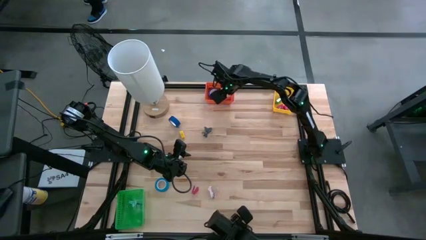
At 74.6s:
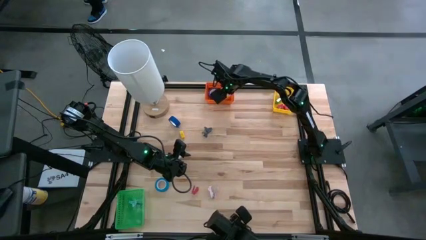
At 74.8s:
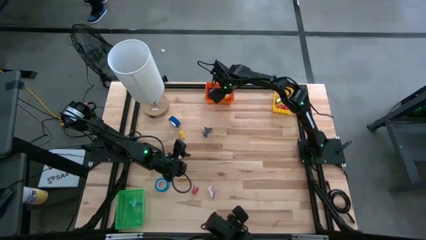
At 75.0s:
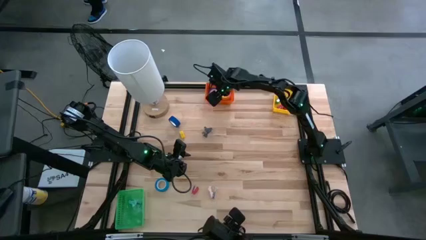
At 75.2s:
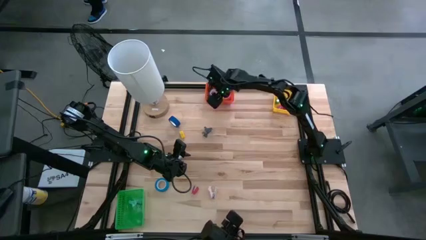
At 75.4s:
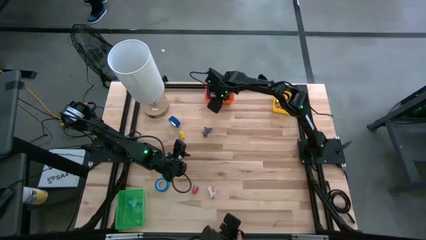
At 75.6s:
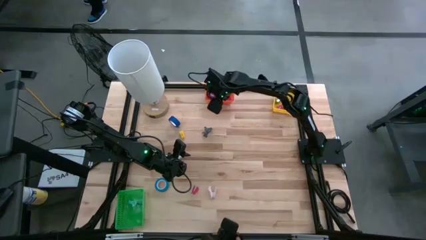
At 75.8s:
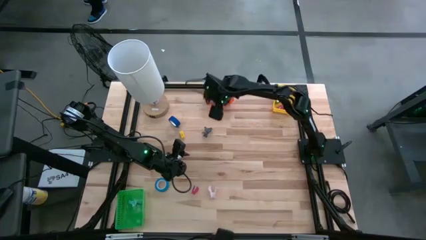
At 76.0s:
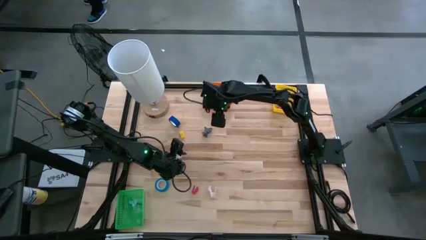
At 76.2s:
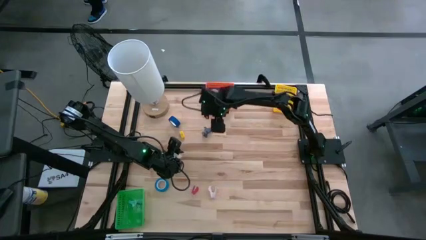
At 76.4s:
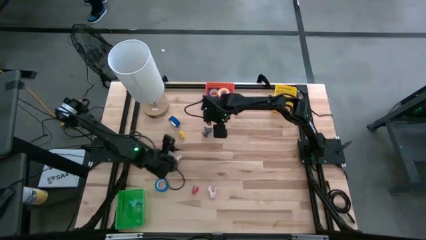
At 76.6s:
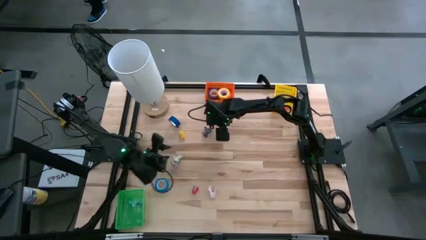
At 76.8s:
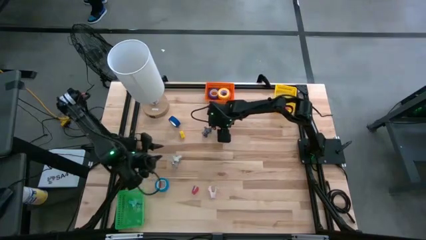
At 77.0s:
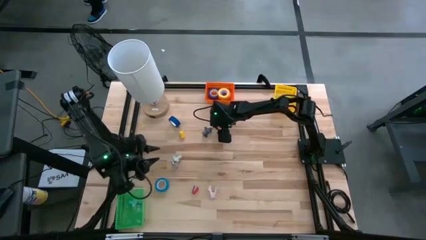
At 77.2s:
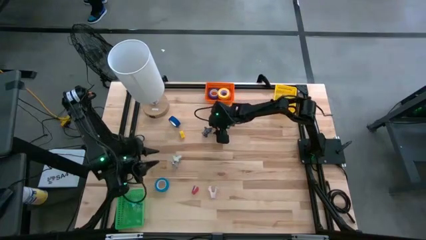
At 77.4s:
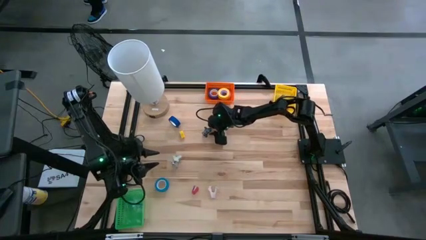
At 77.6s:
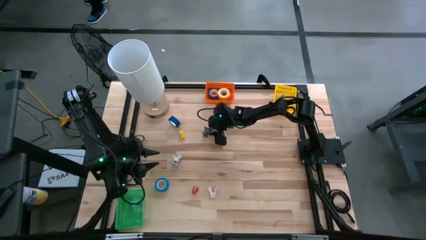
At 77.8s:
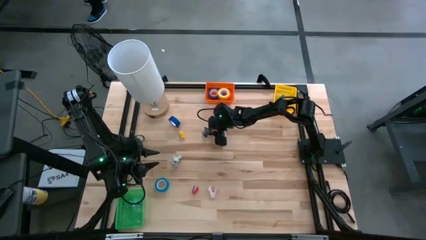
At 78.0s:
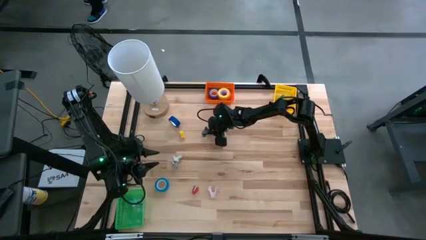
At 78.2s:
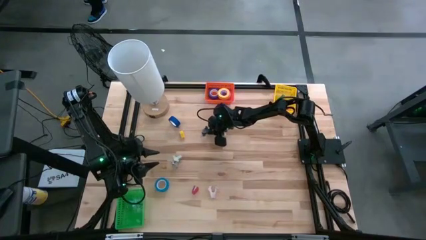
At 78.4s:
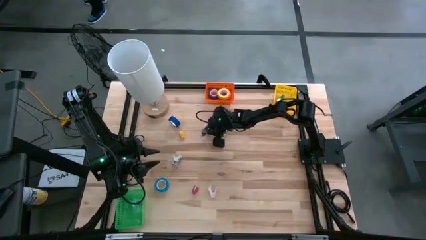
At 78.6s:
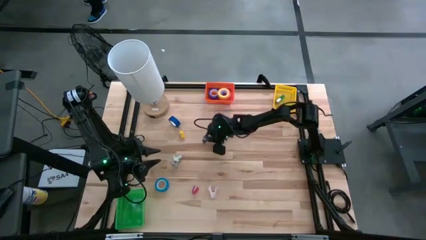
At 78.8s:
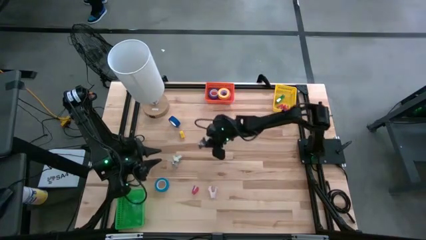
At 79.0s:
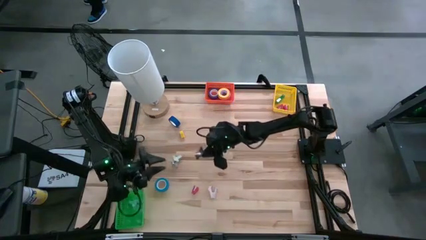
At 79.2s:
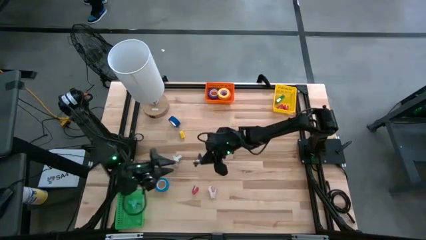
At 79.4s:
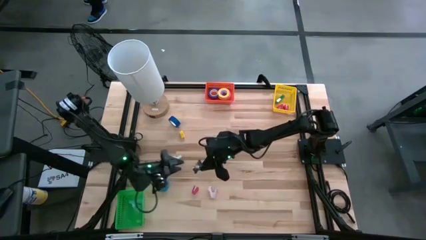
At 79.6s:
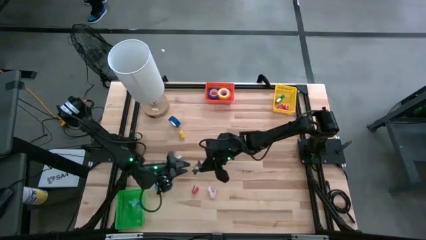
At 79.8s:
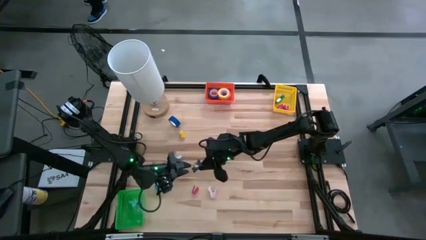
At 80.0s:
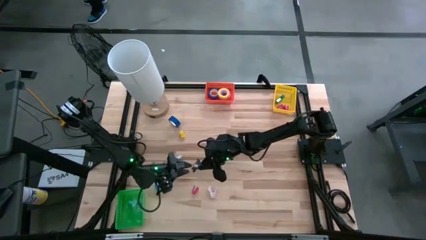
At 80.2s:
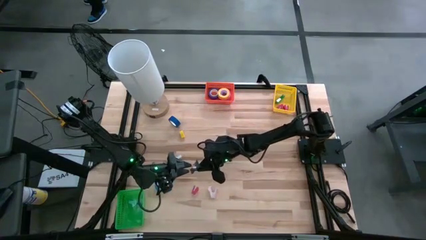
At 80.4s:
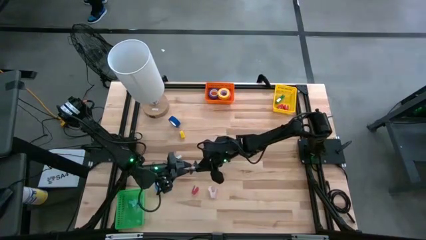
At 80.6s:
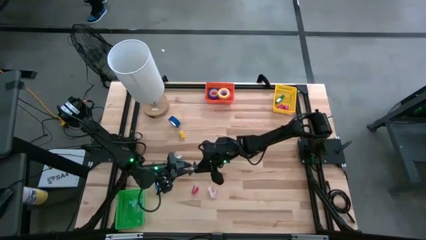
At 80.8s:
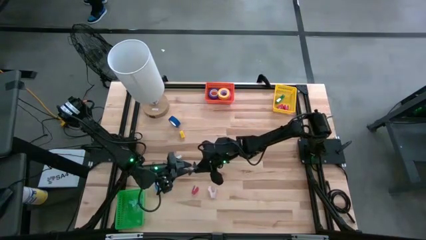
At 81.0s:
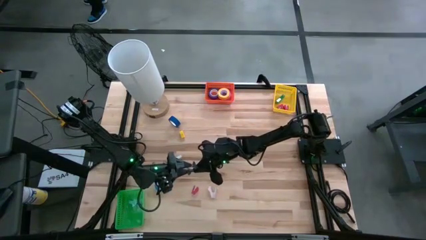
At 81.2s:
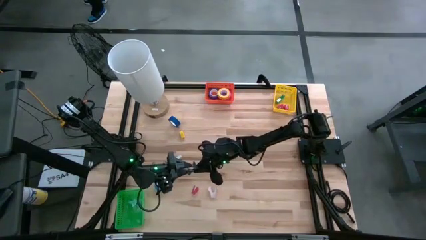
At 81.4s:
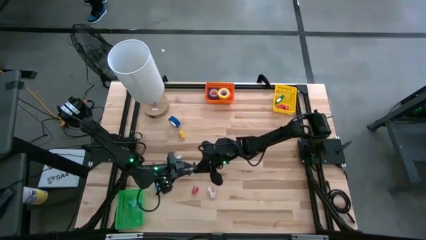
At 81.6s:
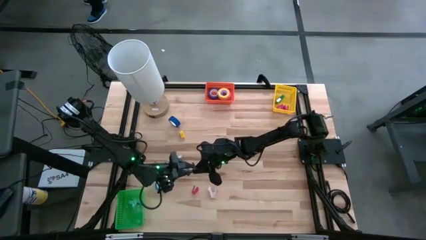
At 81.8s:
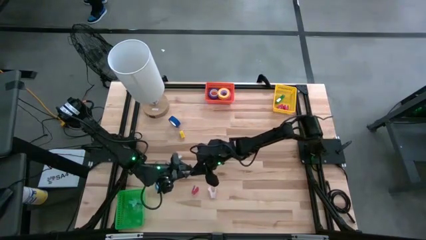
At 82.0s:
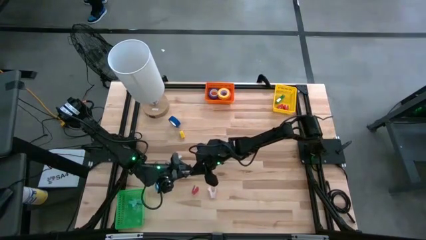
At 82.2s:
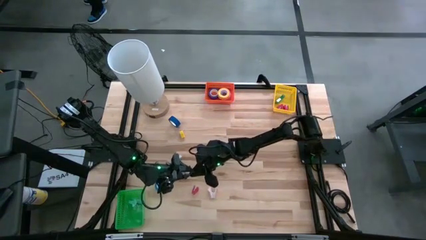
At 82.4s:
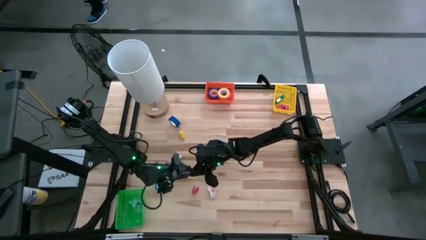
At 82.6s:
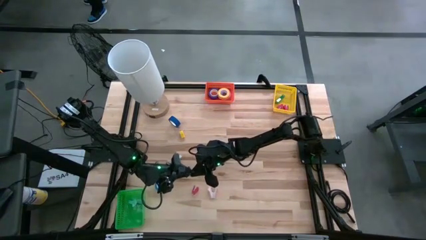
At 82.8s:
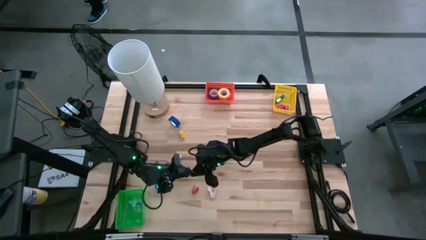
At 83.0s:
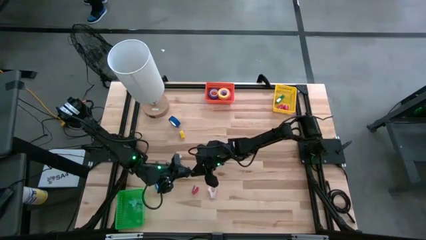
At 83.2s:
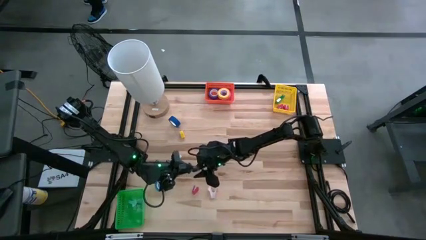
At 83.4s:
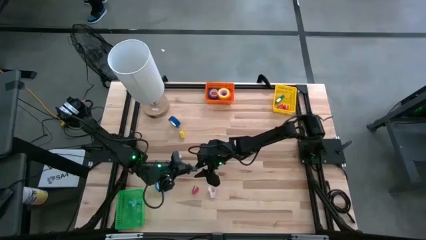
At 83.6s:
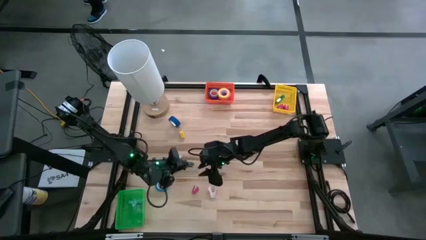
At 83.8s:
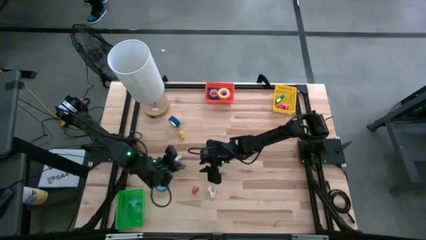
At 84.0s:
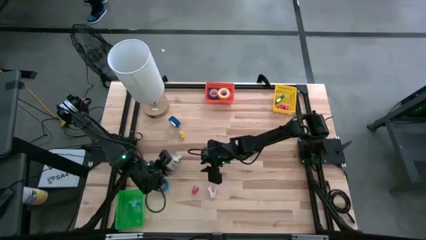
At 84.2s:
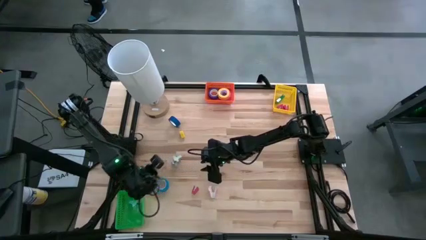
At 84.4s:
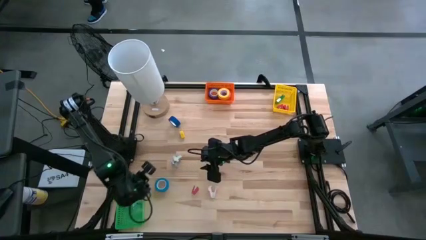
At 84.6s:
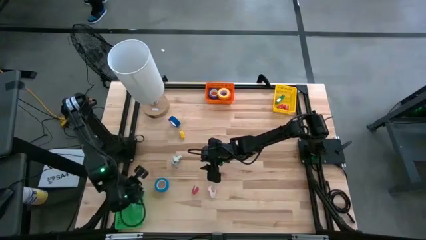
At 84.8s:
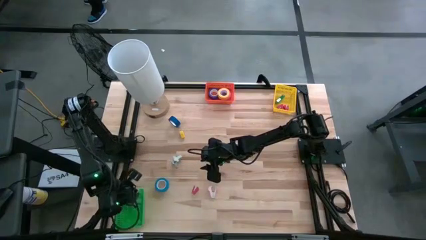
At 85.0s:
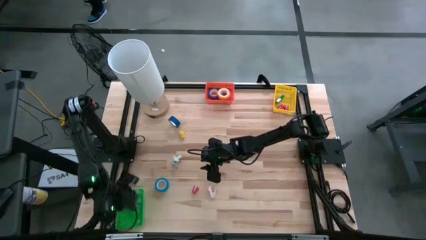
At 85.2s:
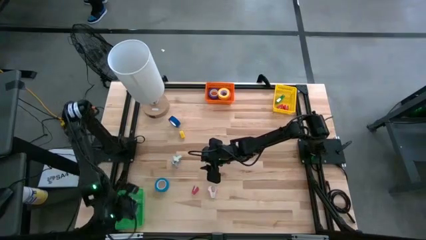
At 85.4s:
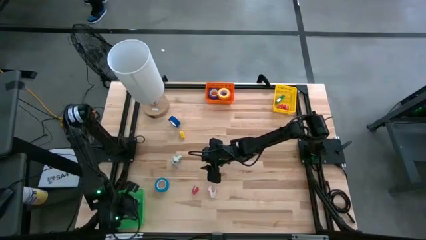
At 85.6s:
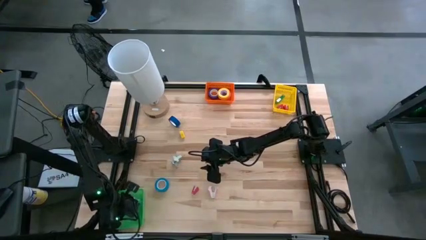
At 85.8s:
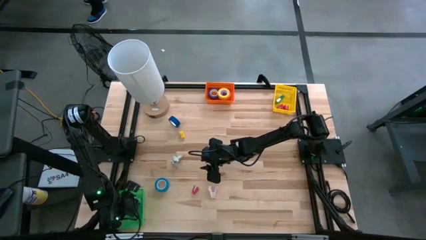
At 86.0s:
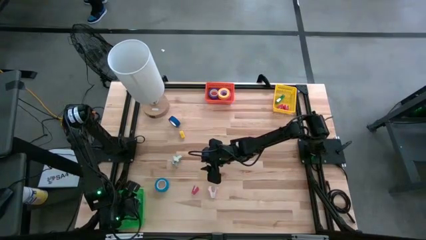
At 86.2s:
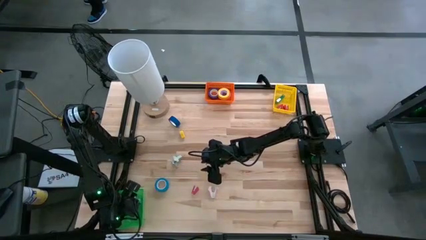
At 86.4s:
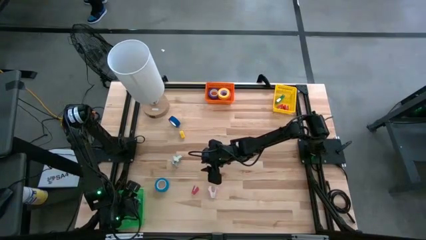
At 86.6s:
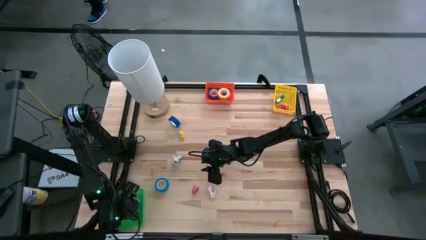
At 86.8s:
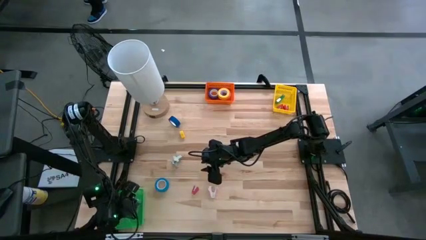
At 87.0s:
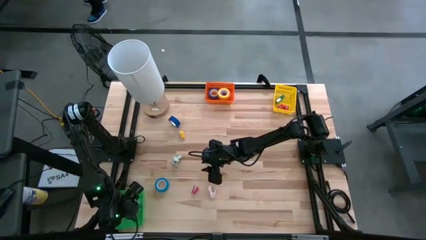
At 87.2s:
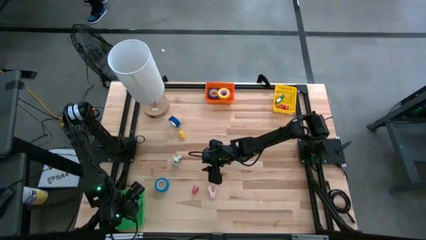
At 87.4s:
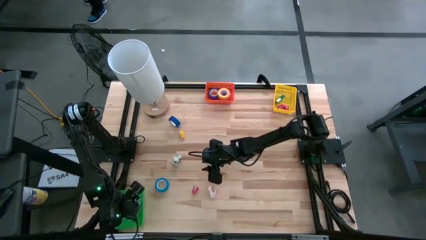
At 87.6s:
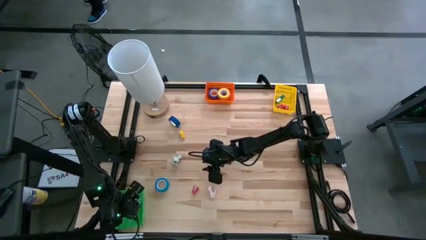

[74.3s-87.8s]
Task: Pick and place Stapler, Stapler remover, tape
Put the dark gray staple remover into the green bin

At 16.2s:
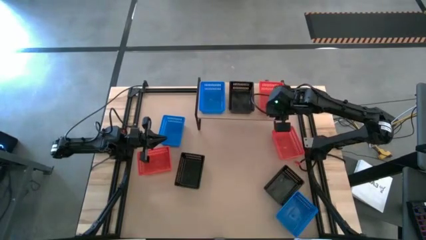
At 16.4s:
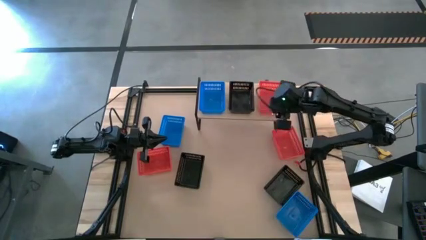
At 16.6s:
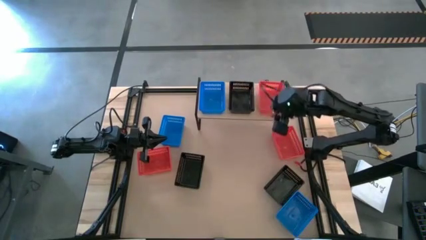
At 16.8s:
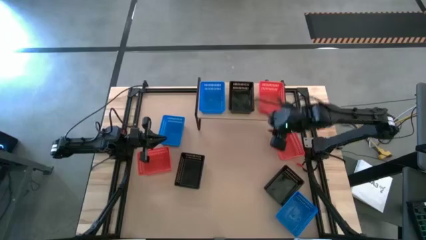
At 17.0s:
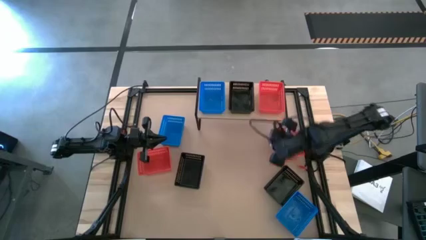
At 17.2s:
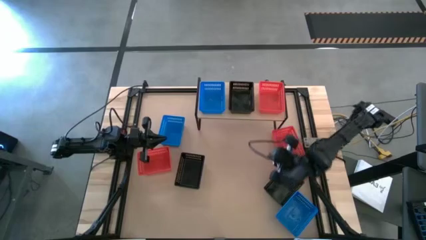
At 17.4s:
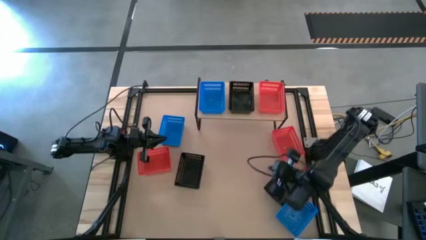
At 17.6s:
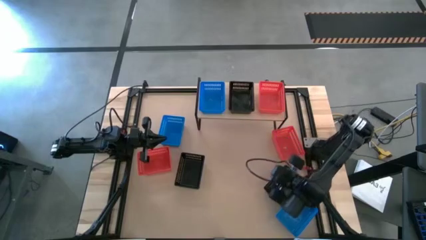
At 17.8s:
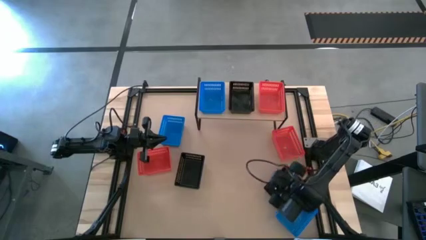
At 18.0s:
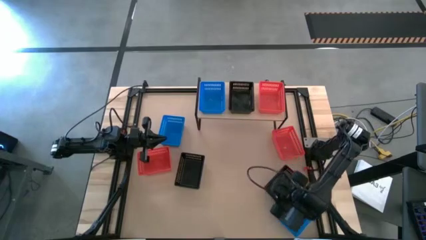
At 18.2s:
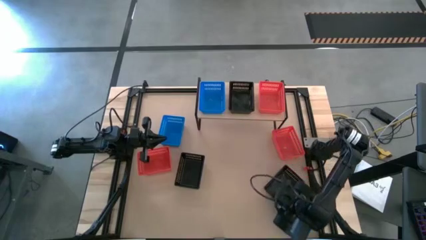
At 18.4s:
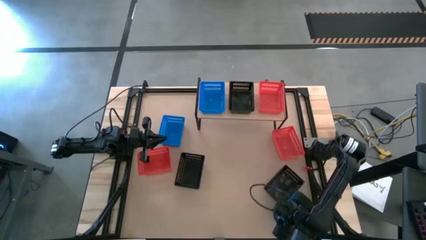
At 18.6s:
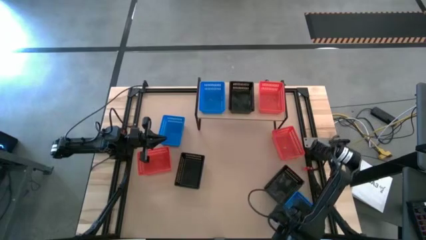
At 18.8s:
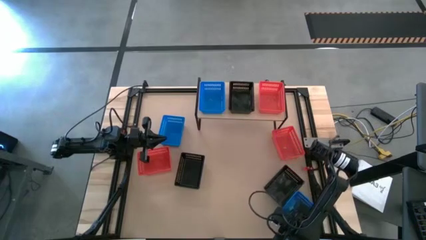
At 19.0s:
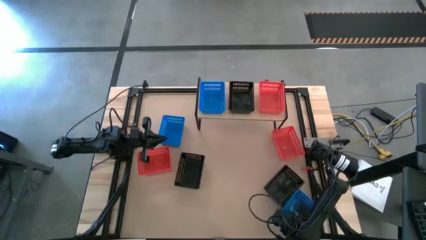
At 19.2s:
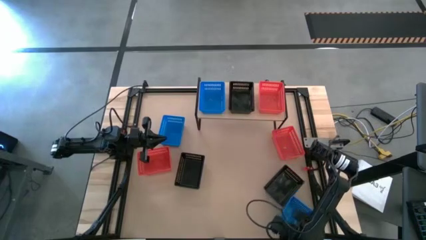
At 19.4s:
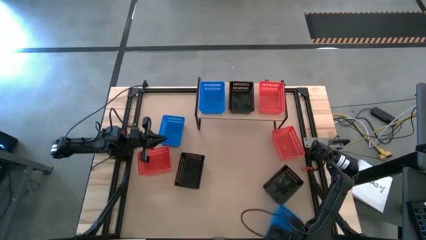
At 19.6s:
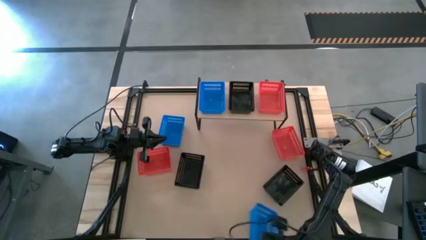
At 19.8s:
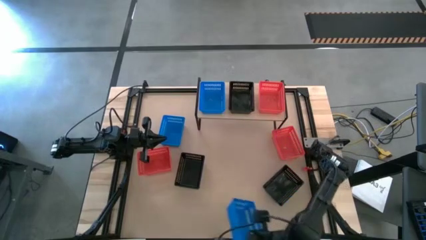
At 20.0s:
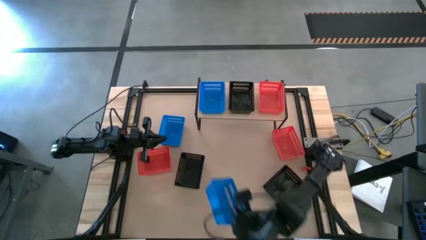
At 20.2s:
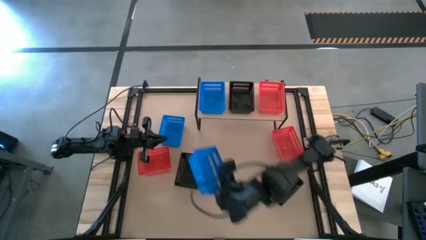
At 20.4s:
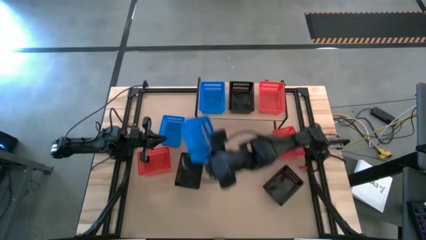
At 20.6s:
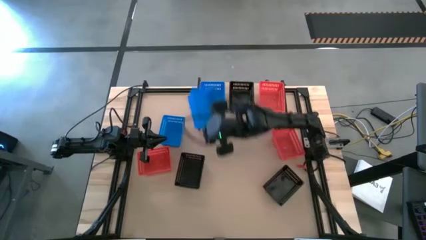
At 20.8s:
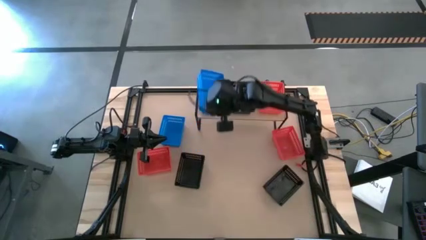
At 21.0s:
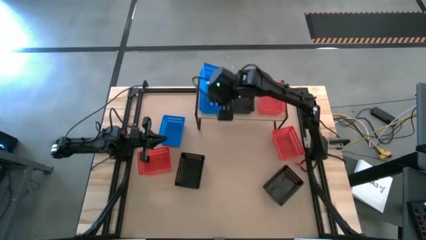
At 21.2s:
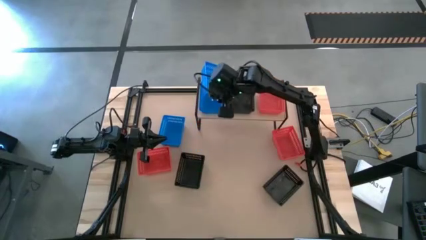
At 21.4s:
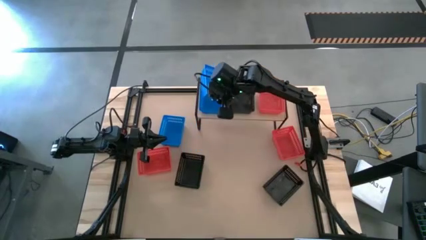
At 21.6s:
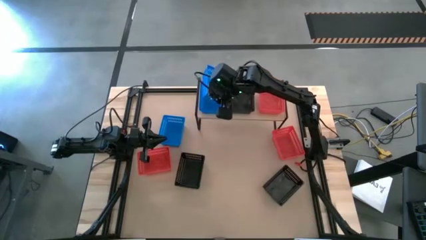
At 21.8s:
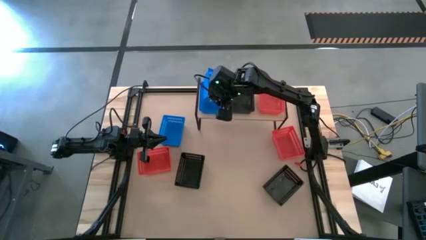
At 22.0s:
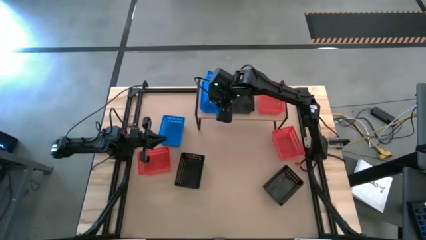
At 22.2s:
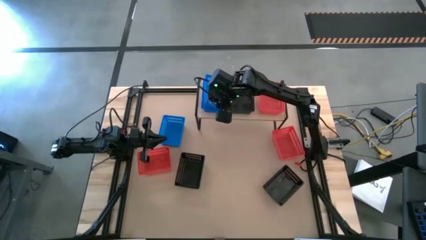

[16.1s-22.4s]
Task: Stack baskets on shelf by color
Stack the bottom blue basket on top of the blue basket on the shelf
